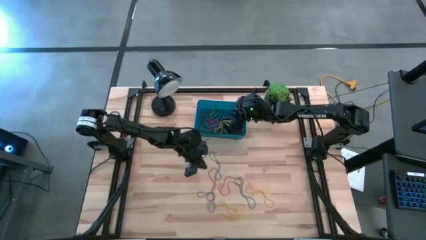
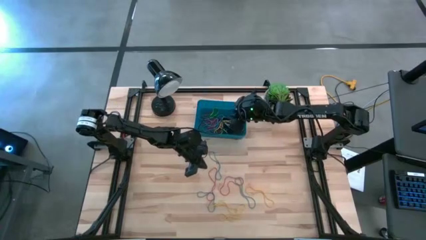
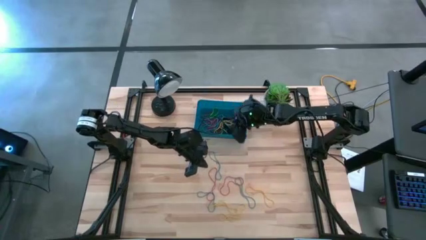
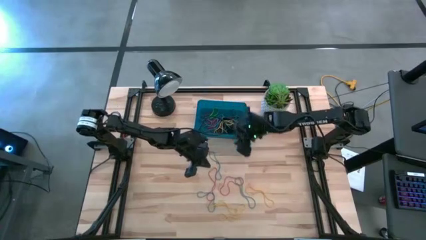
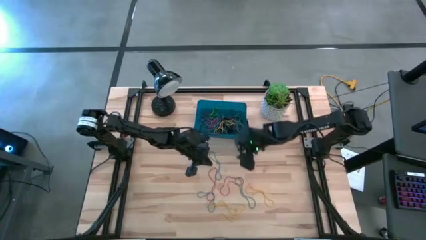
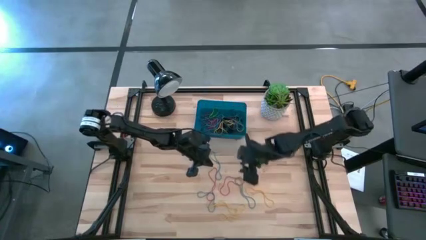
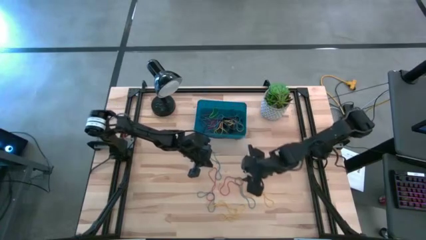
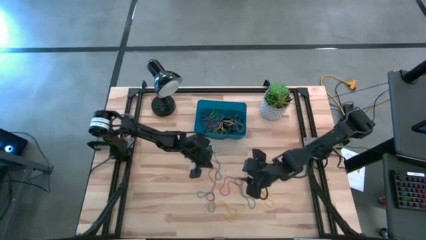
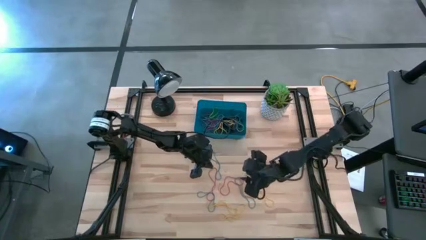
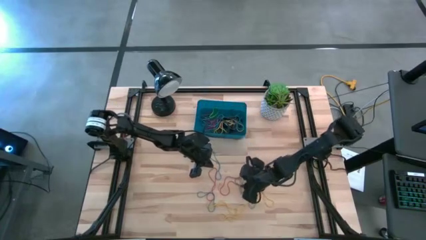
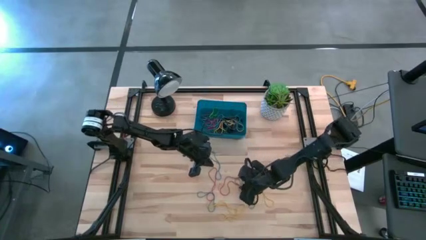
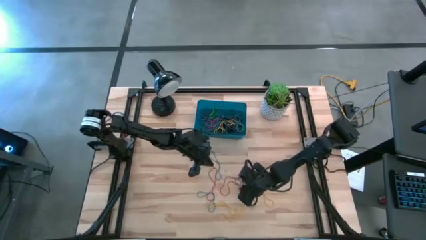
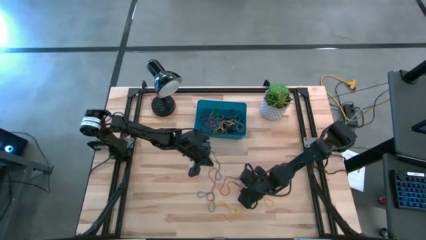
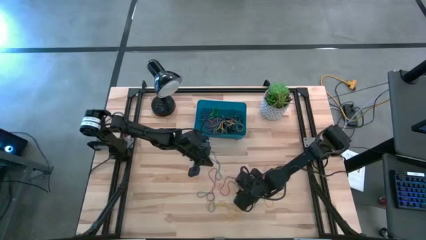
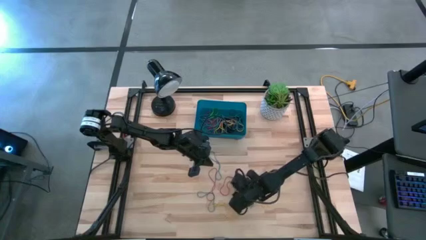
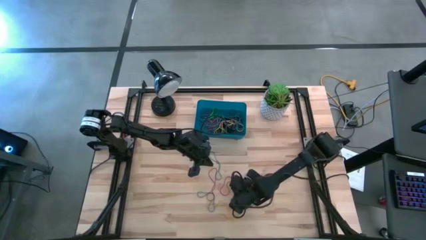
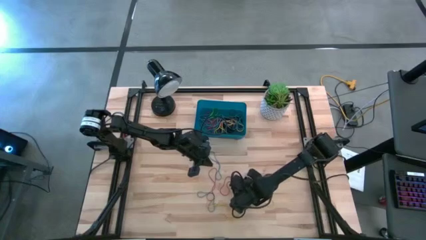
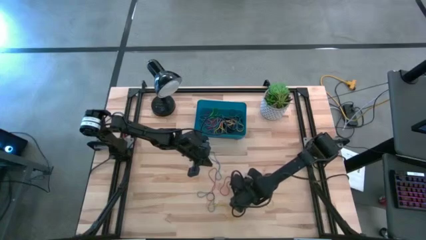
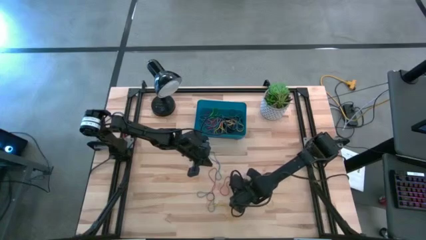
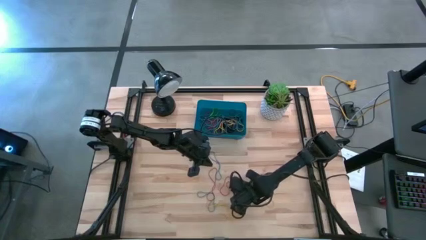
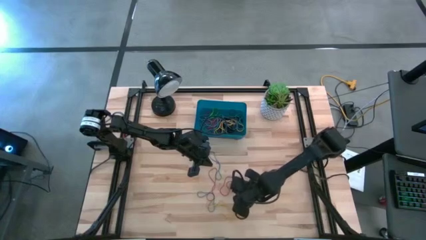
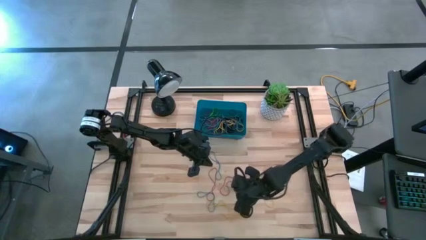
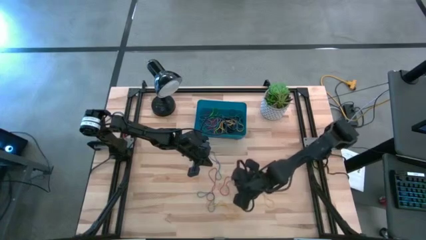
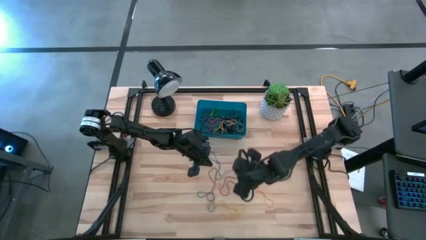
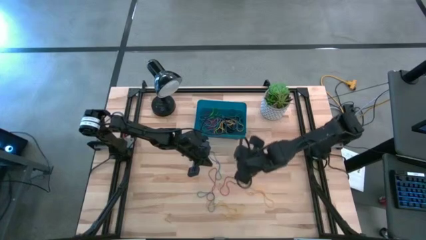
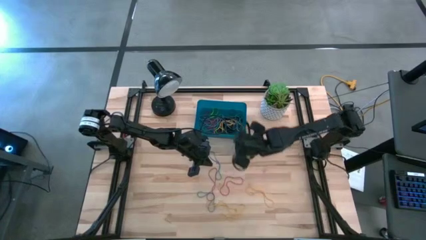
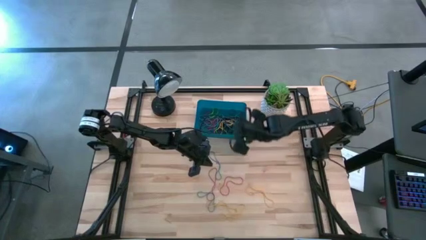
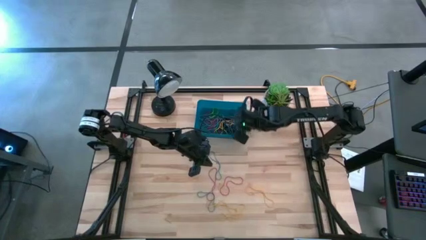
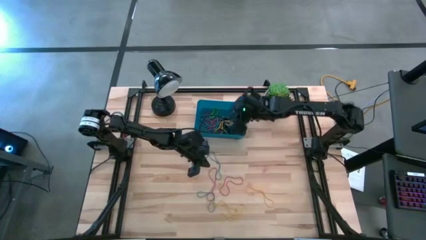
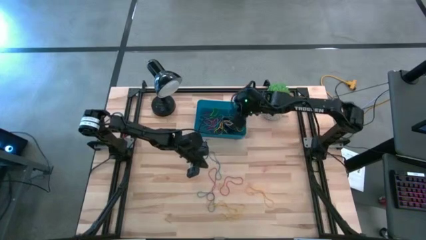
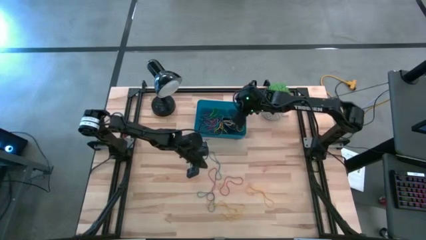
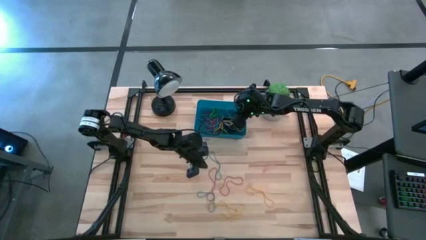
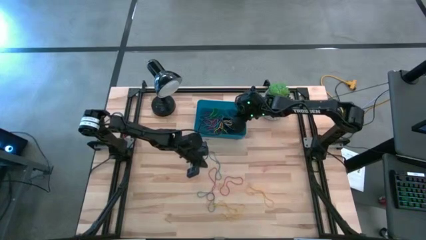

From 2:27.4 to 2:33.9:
Task: Pick and place rubber bands into bin
Put the bottom right blue rubber band into the blue bin

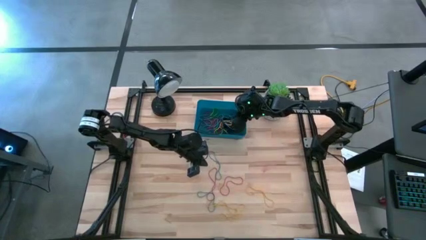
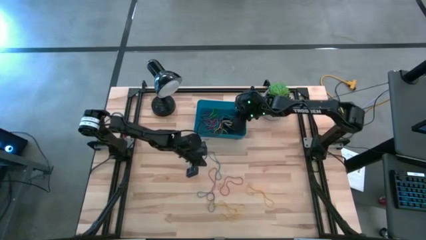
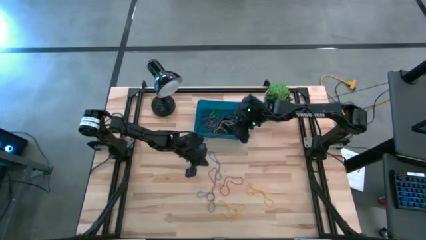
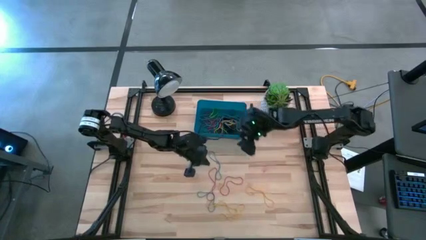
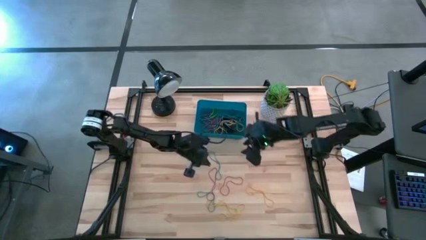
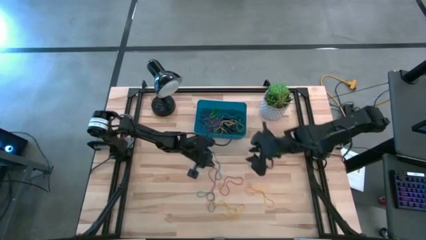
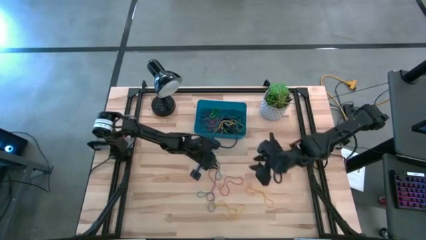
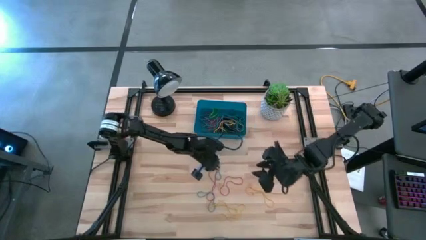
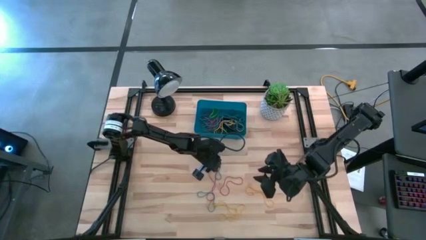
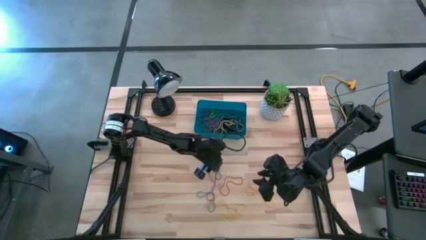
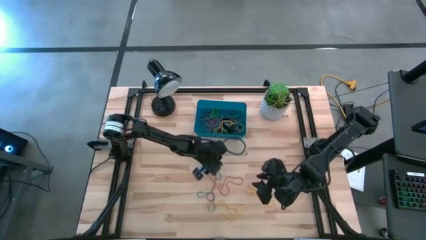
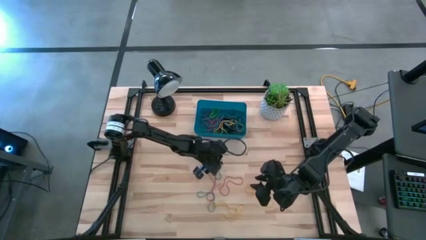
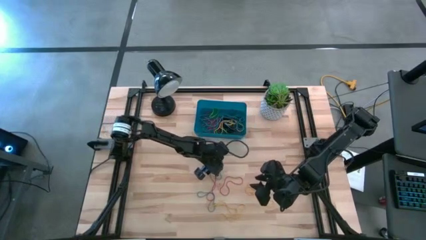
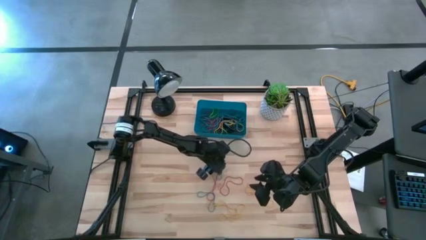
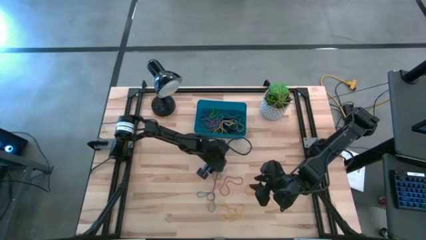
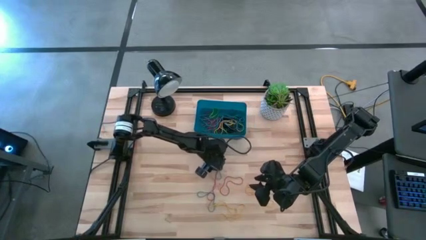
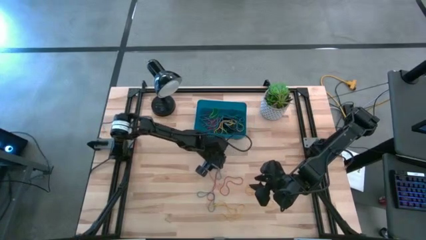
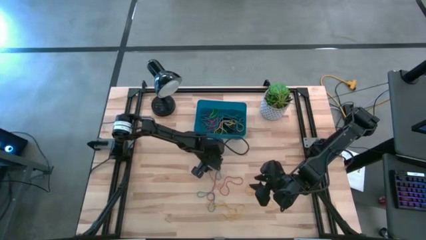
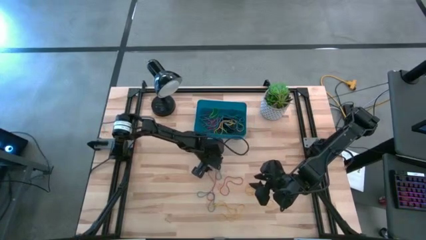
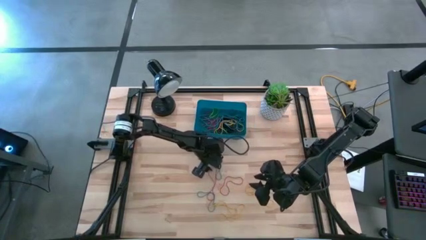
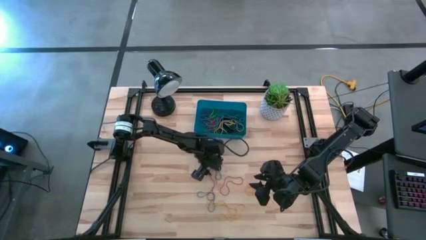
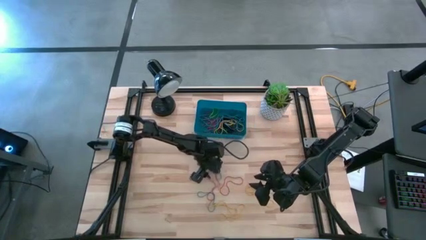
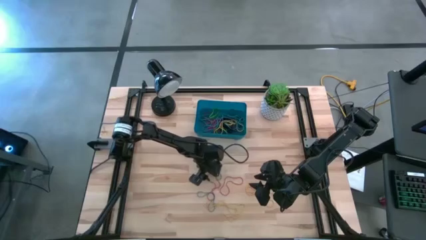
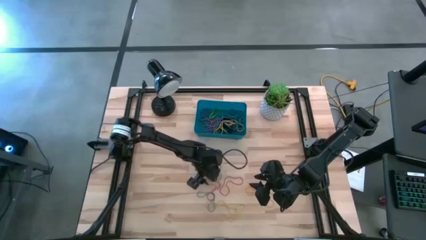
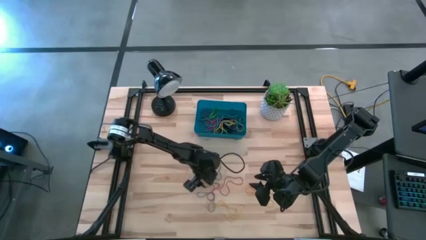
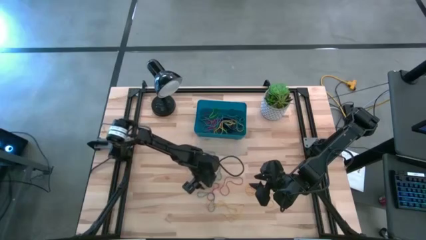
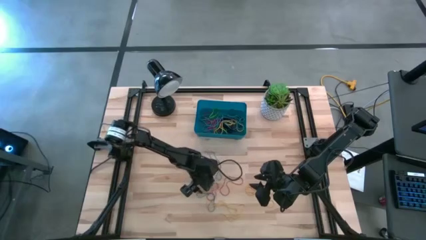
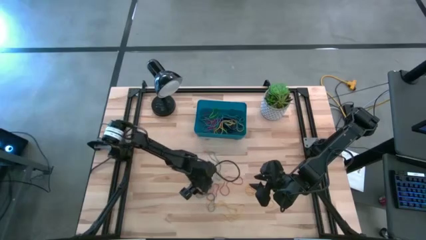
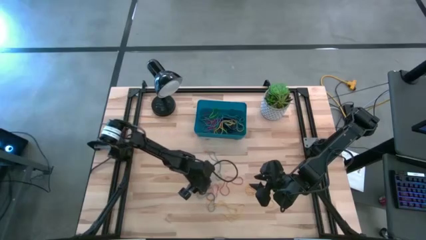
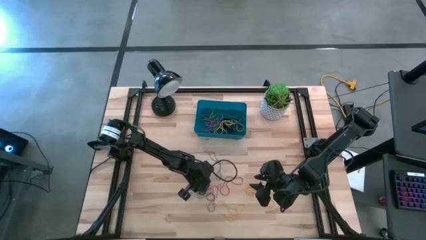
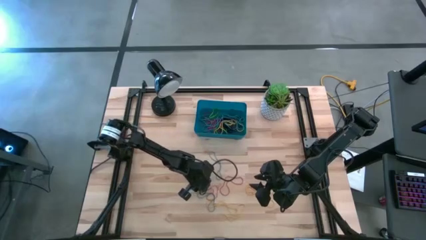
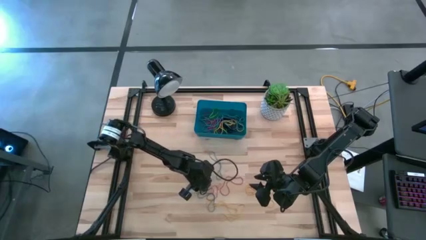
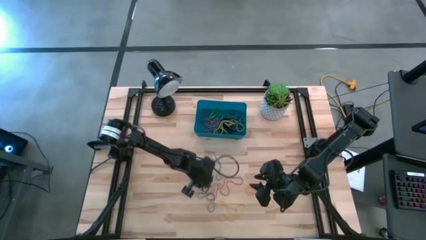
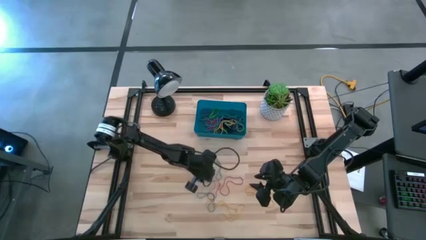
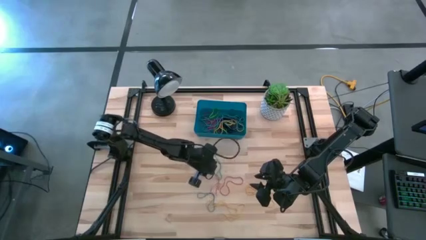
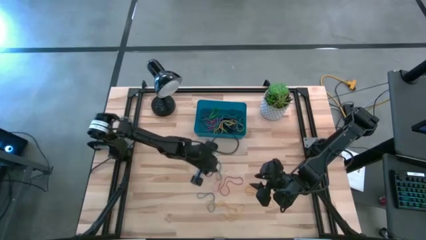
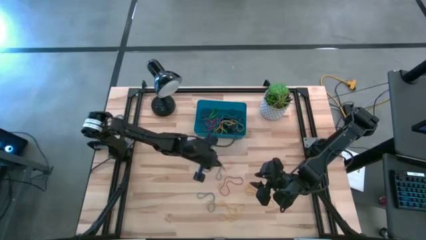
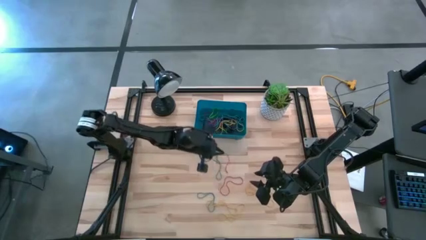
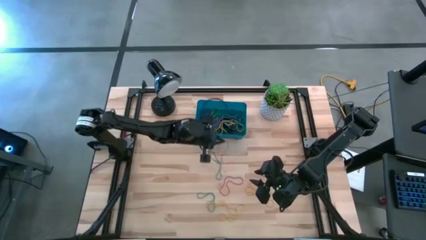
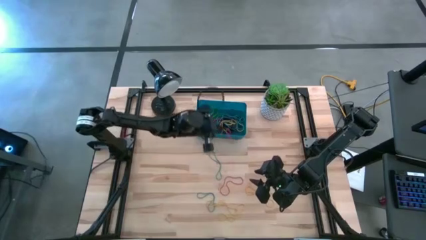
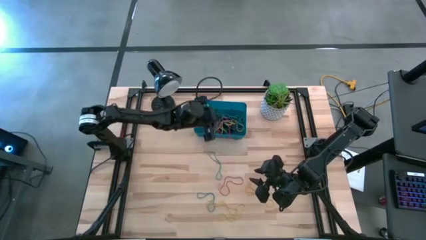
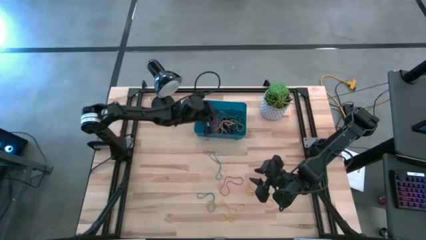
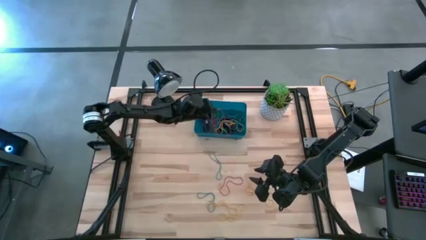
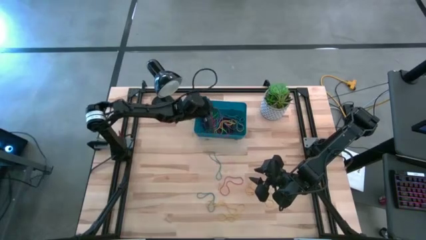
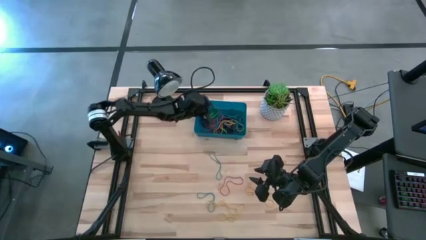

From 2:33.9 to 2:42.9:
Put the left red rubber band into the blue bin
